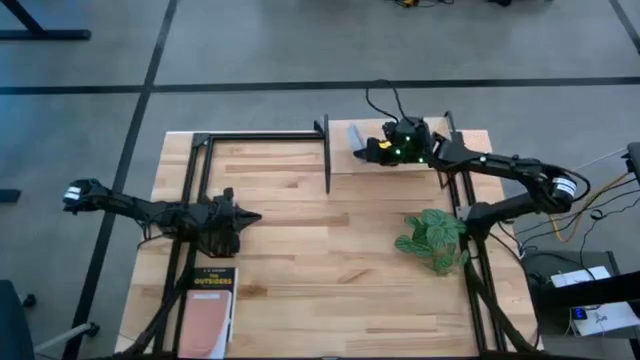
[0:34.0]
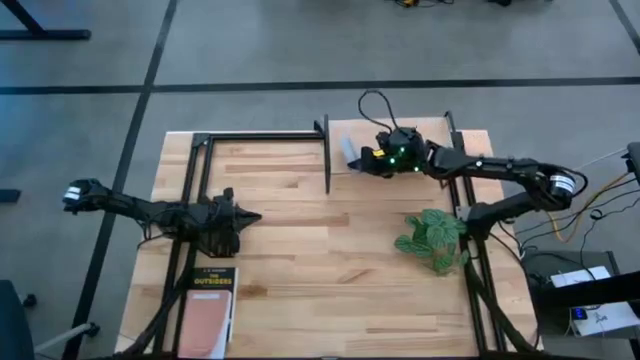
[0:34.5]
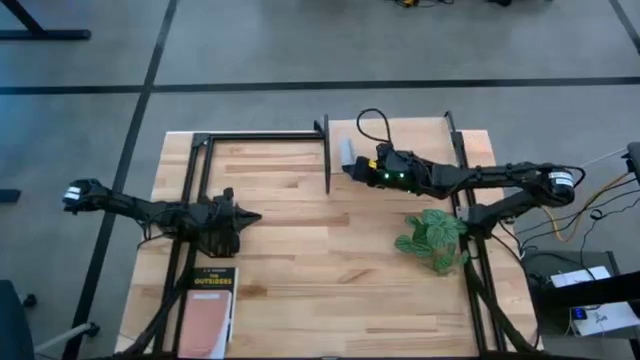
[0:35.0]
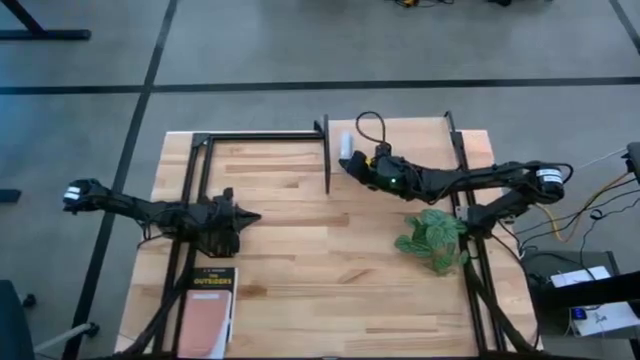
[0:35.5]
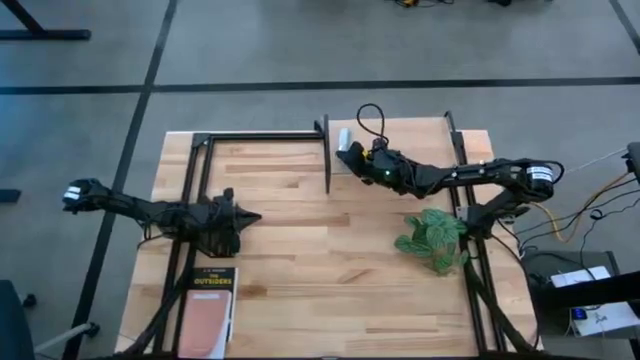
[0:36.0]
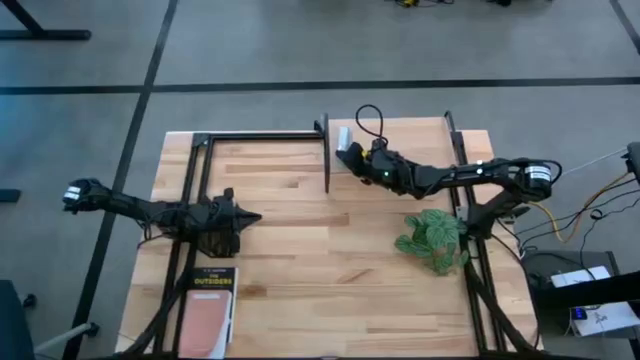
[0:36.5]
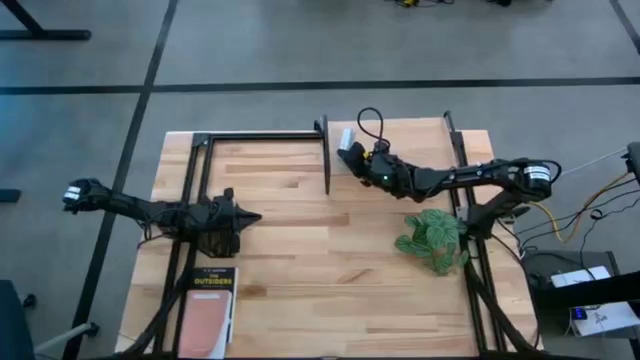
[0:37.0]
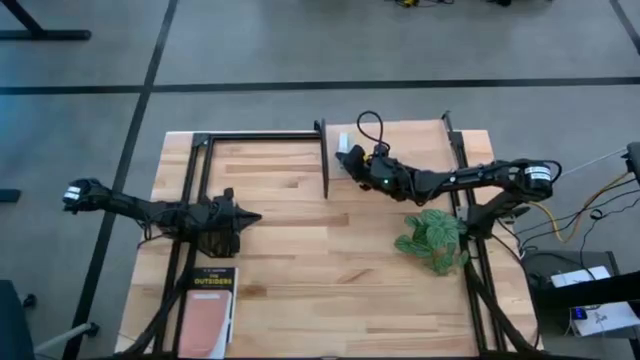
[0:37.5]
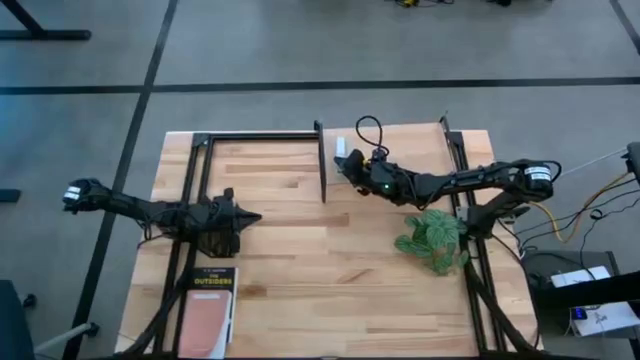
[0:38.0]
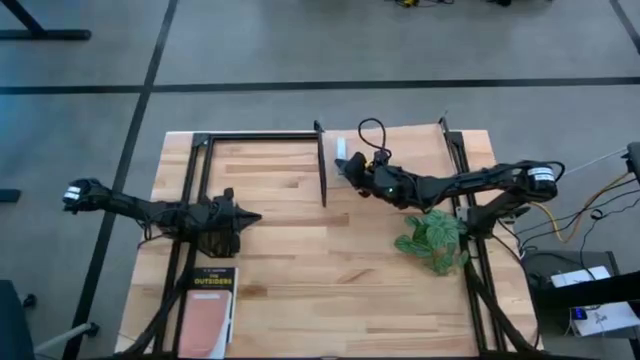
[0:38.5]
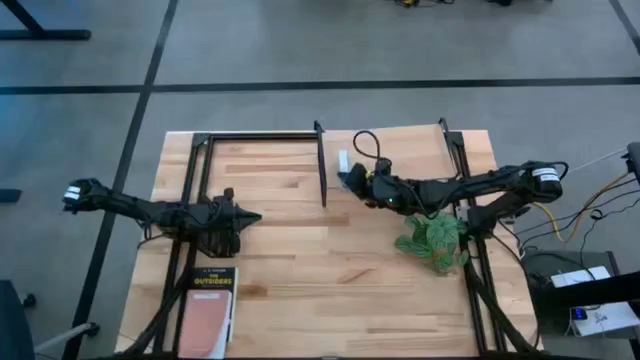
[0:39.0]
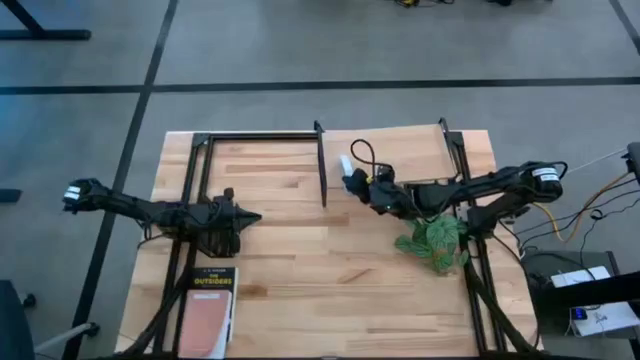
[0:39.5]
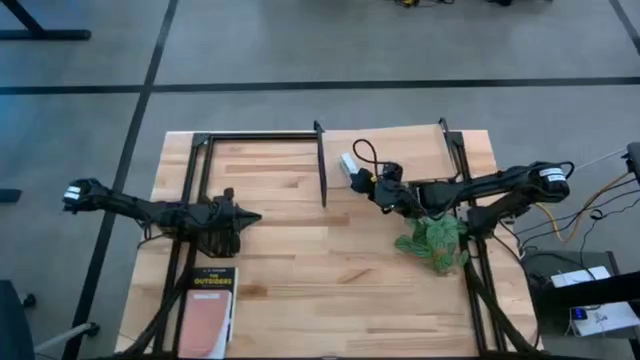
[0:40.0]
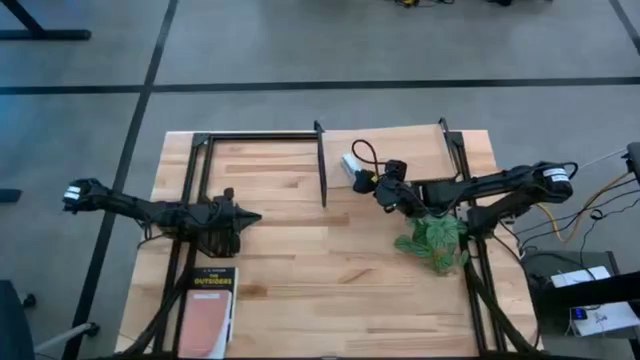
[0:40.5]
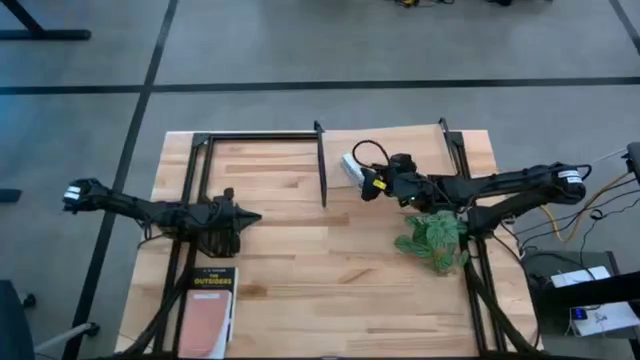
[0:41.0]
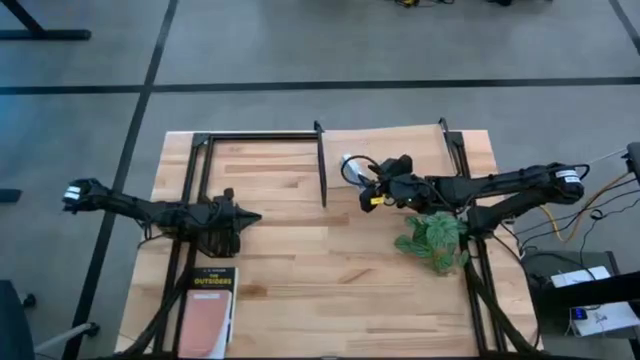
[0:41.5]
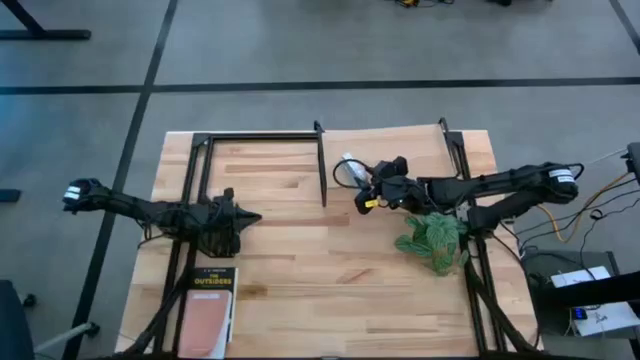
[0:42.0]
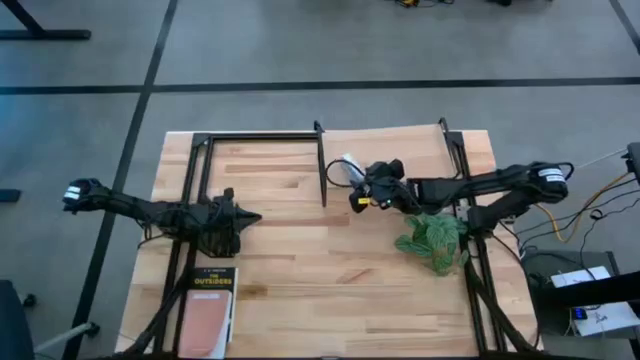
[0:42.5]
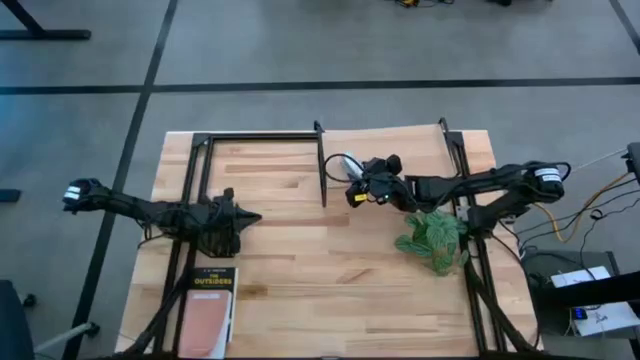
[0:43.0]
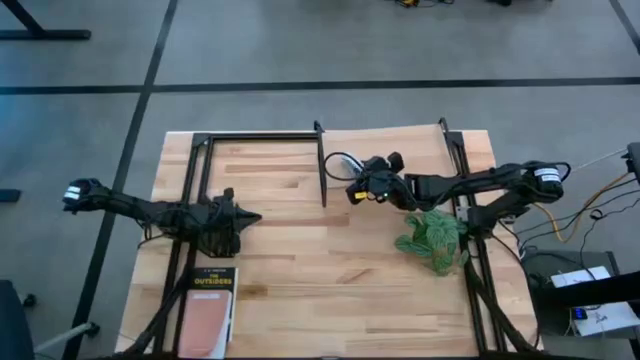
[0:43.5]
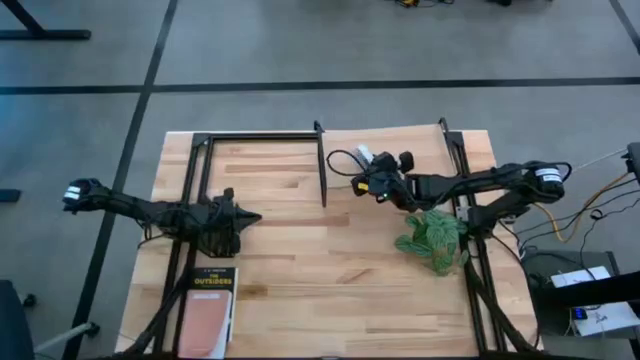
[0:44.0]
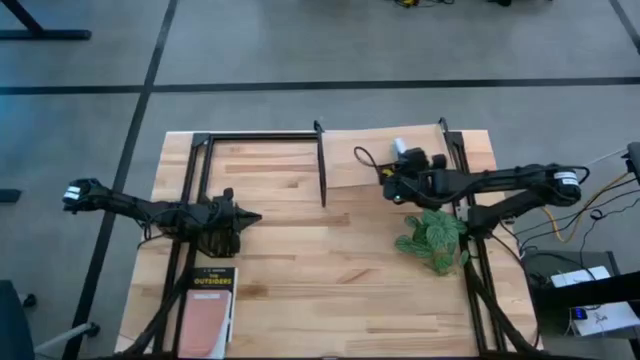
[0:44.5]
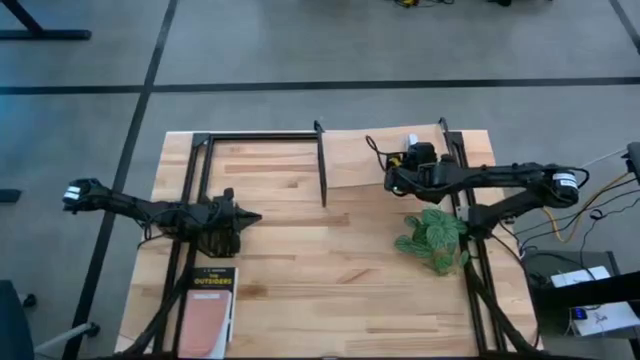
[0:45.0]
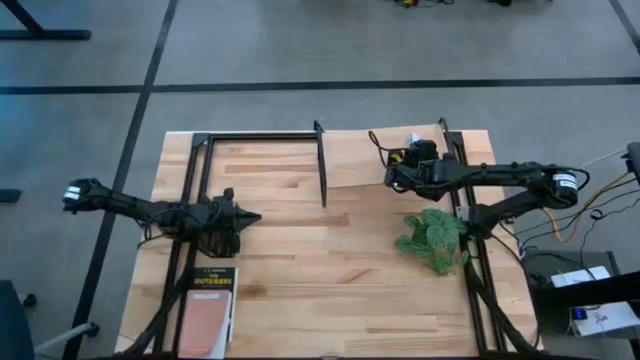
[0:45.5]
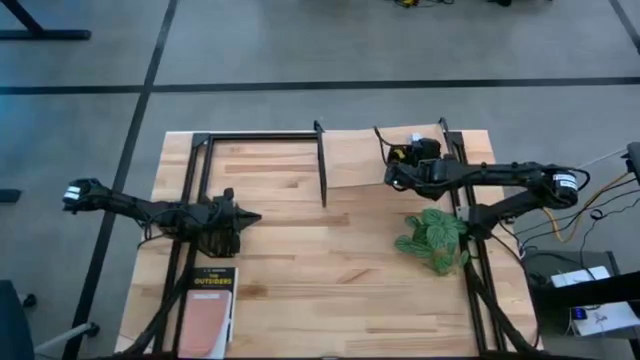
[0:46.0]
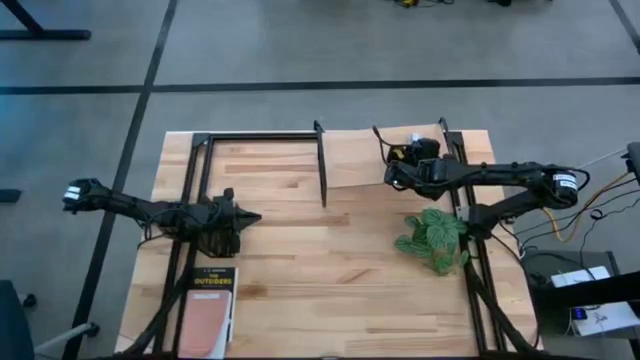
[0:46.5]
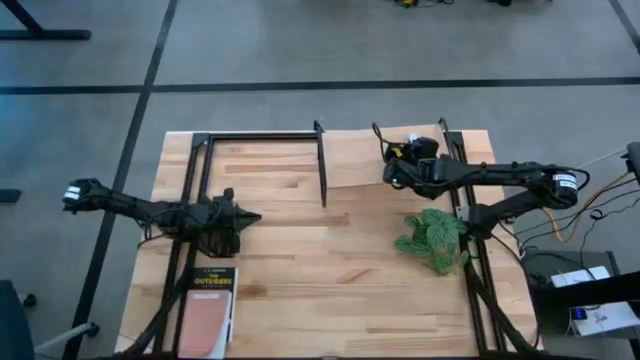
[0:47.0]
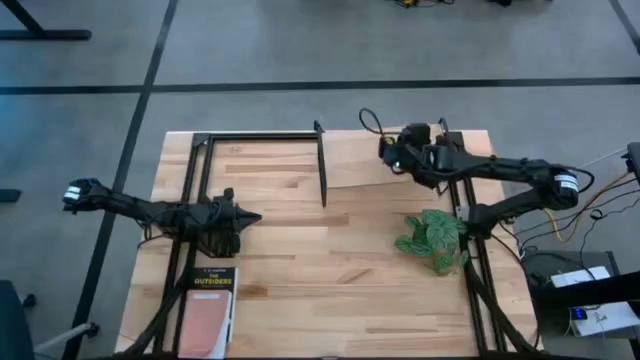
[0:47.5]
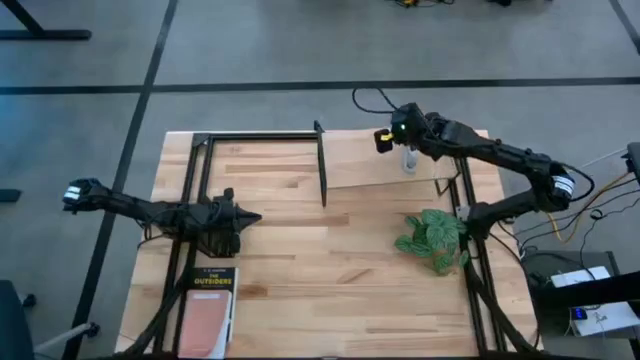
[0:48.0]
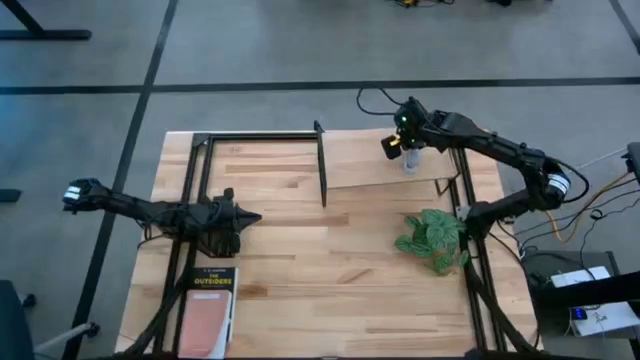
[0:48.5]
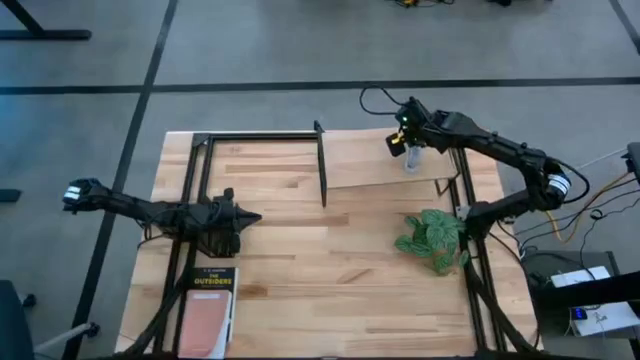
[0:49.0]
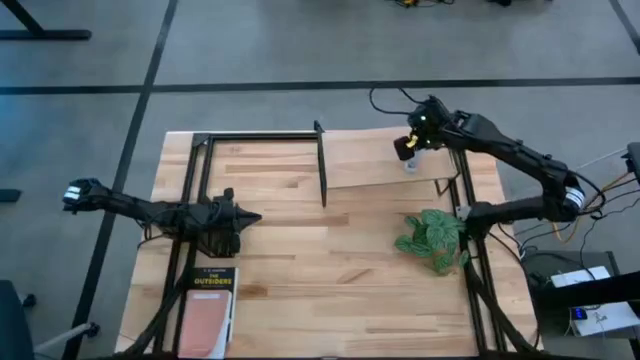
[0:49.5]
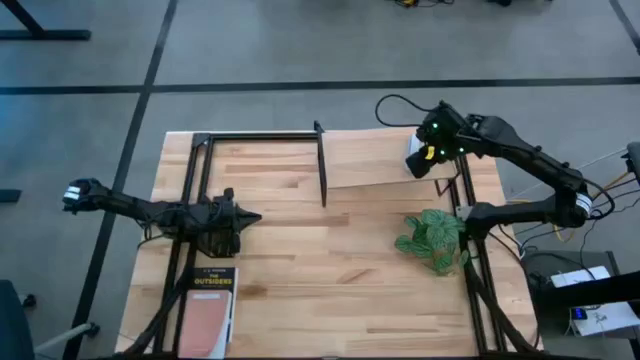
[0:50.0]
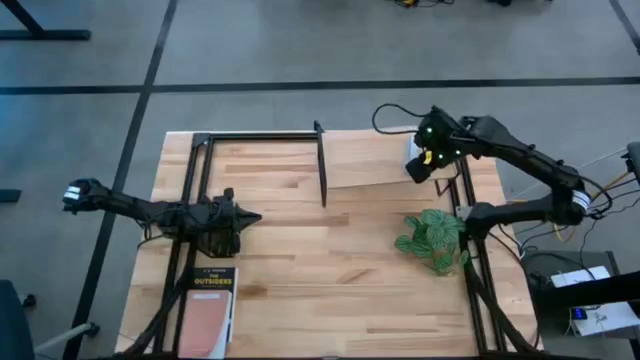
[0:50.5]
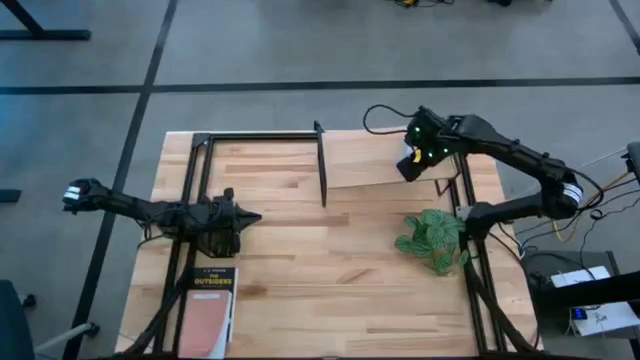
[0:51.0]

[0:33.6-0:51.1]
Task: Stock shelves
Put the gray stapler on the shelf

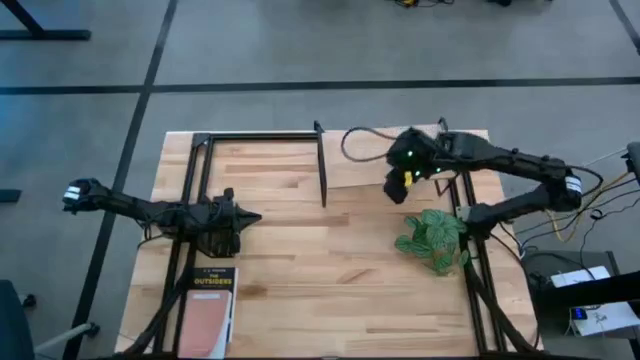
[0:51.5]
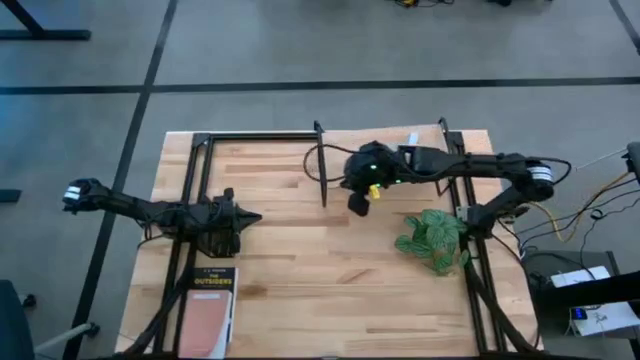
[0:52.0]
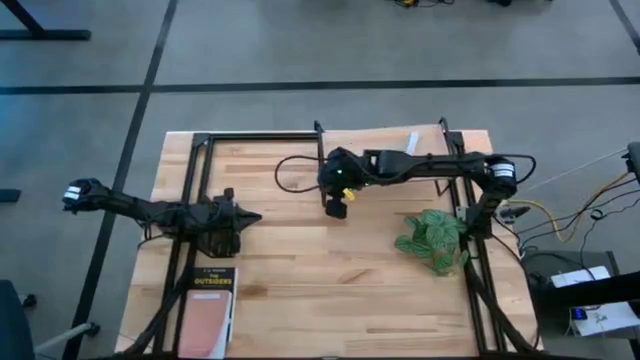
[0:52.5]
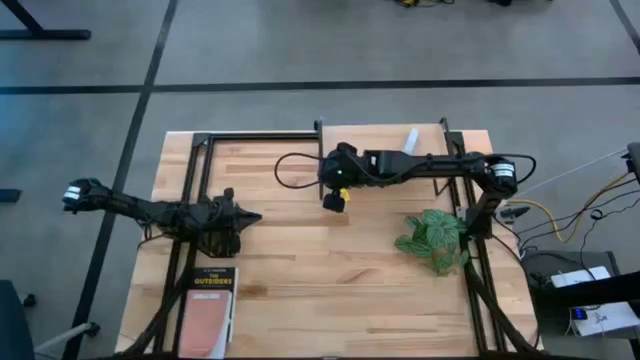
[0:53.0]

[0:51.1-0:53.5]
Adjust the shelf

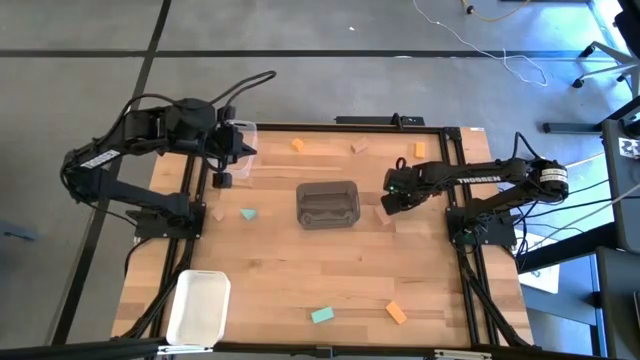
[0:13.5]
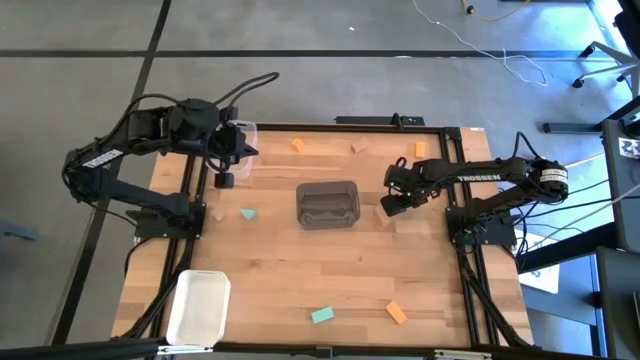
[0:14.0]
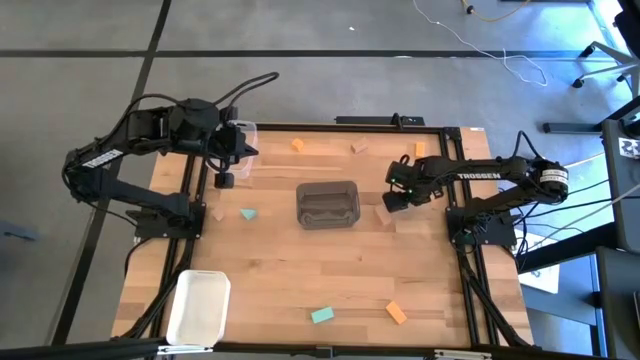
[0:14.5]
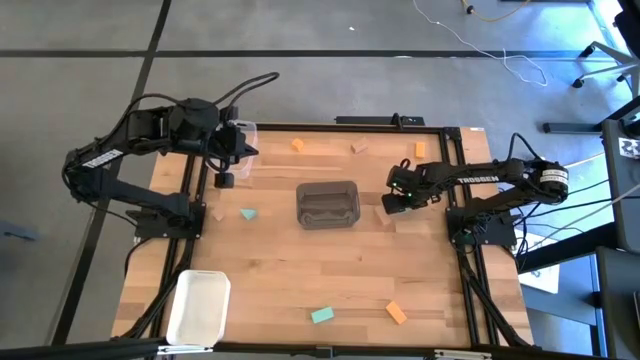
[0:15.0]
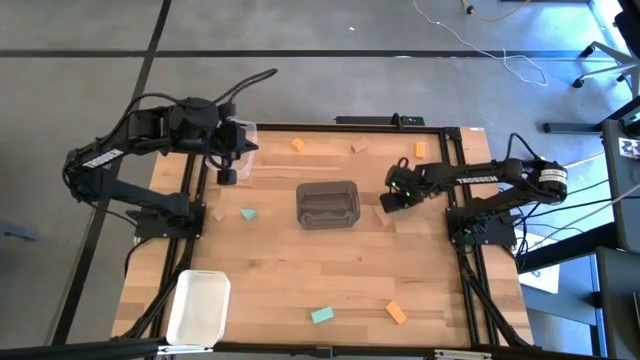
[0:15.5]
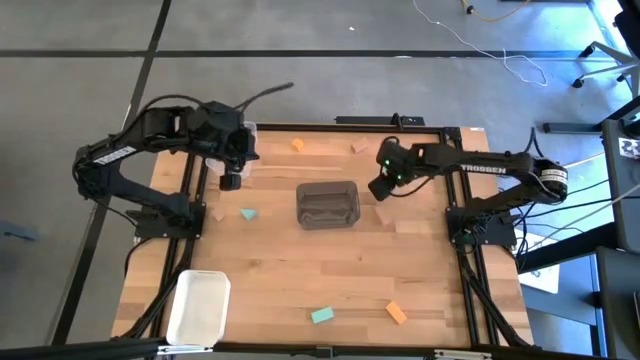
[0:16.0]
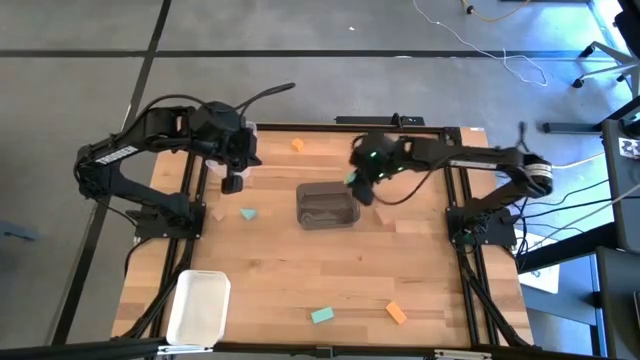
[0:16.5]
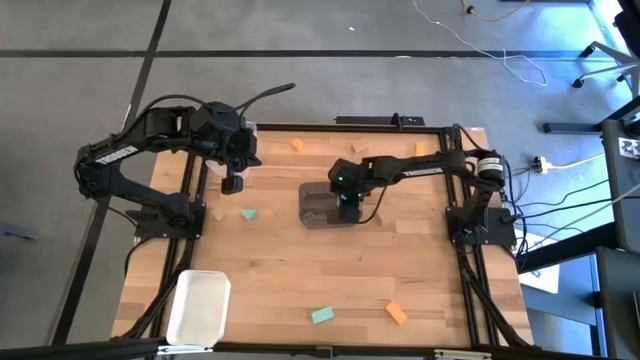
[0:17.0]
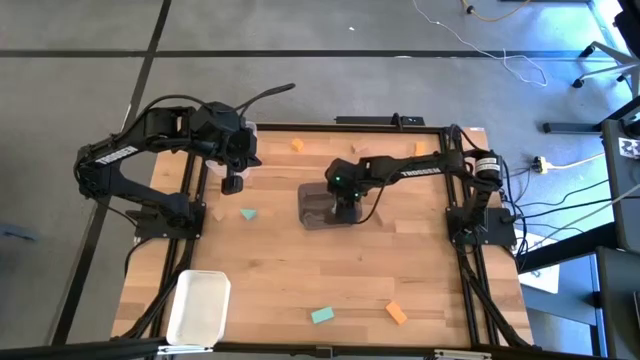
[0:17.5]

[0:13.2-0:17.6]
Task: Sort & place blocks by color
Put the top right light blue block into the black transparent bin
